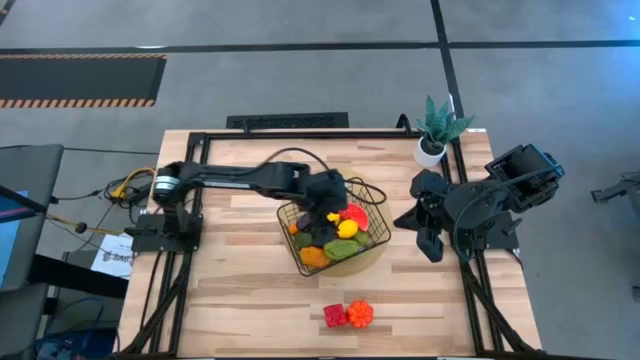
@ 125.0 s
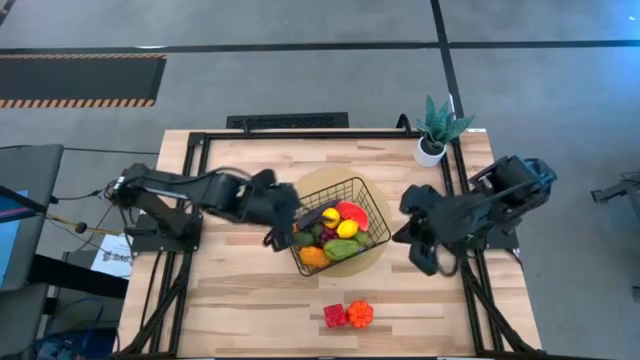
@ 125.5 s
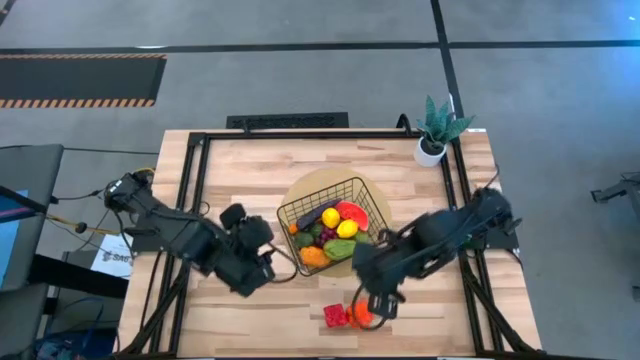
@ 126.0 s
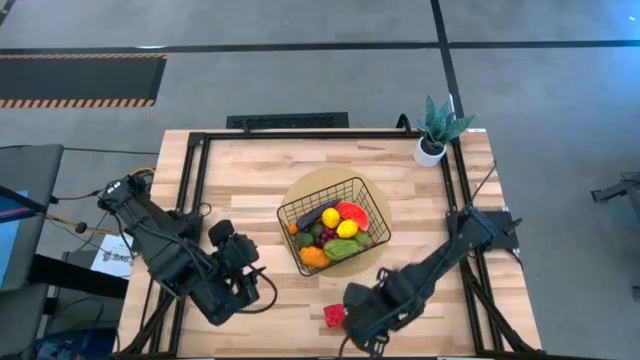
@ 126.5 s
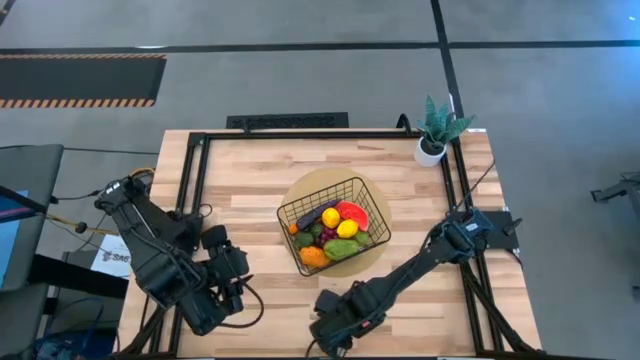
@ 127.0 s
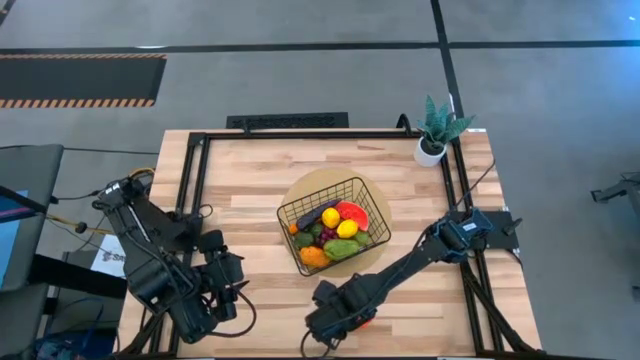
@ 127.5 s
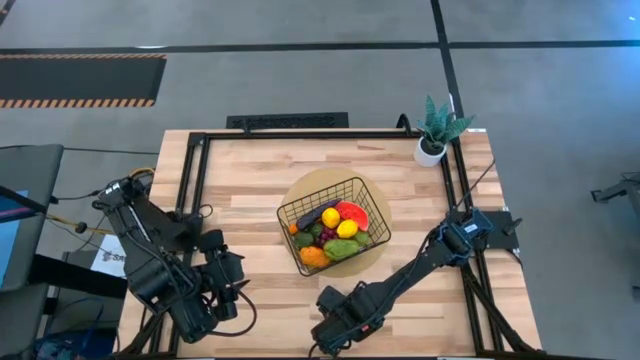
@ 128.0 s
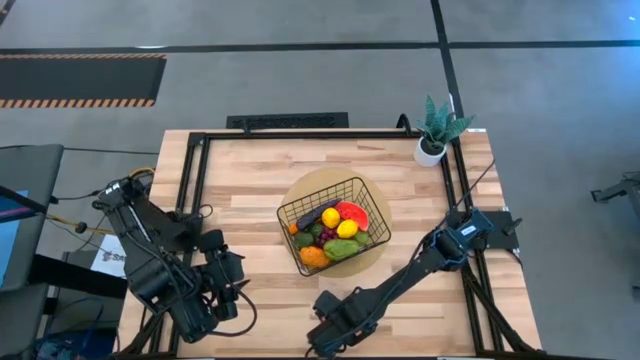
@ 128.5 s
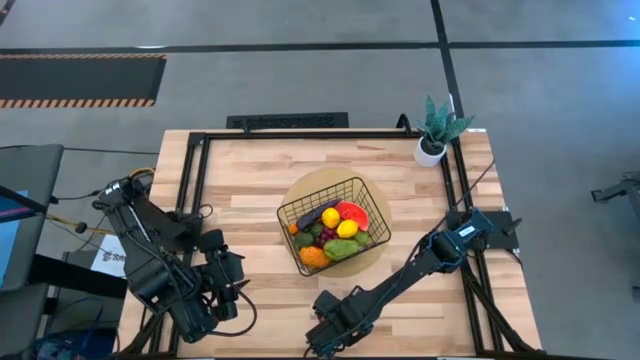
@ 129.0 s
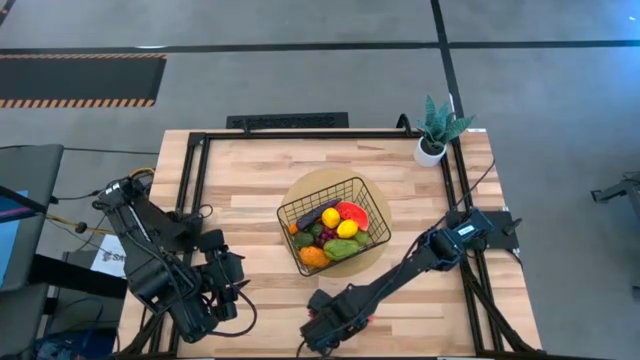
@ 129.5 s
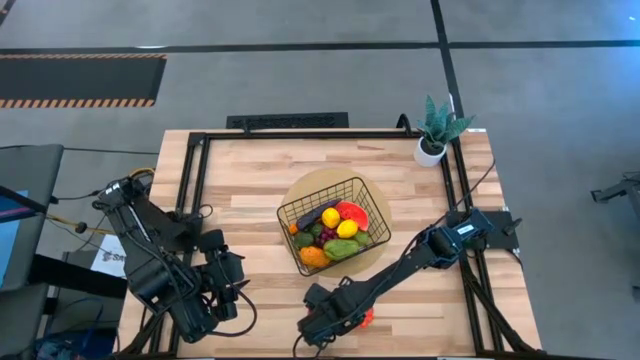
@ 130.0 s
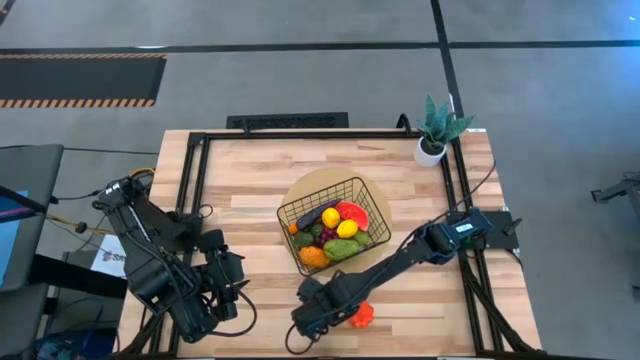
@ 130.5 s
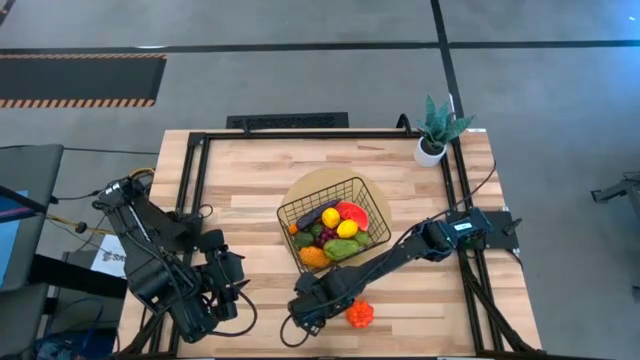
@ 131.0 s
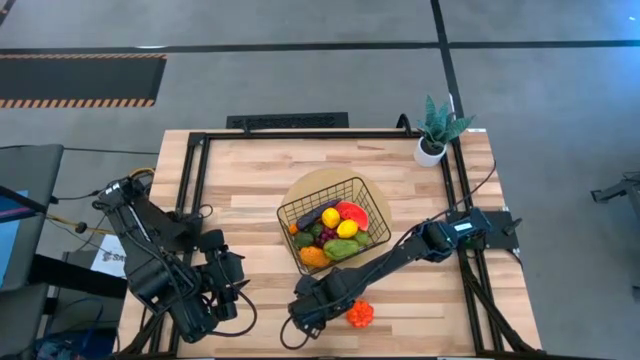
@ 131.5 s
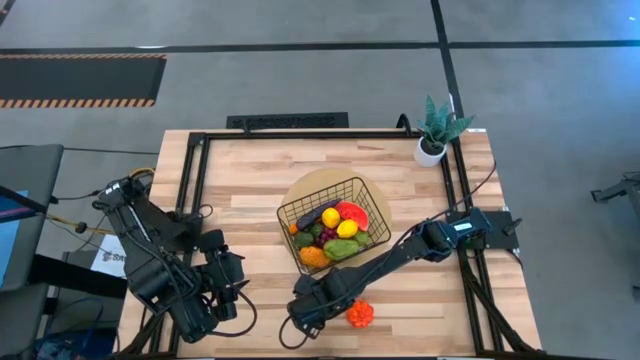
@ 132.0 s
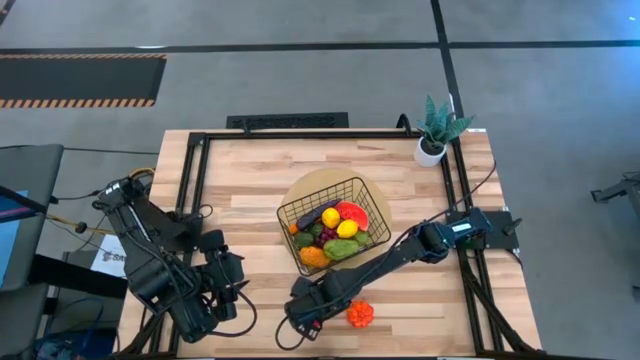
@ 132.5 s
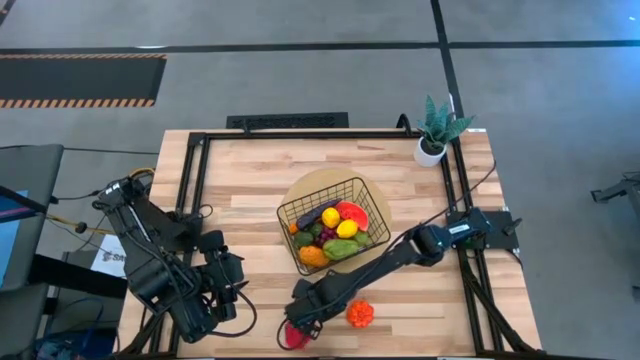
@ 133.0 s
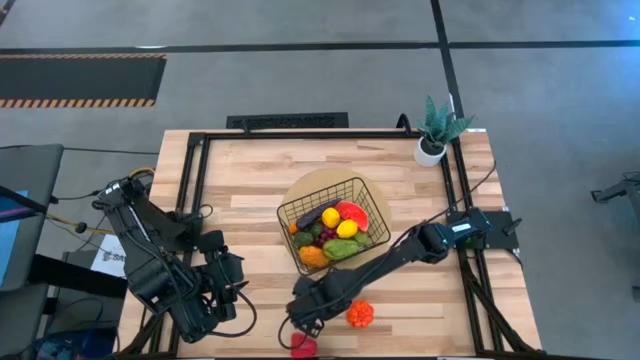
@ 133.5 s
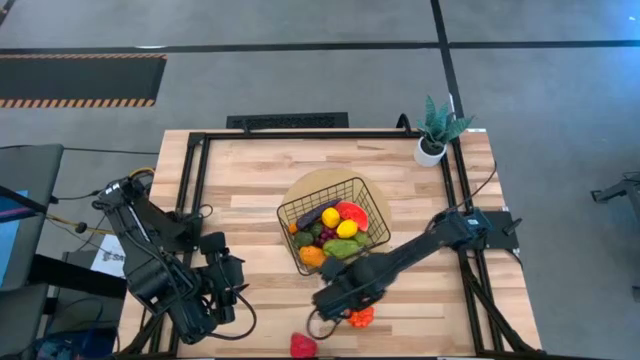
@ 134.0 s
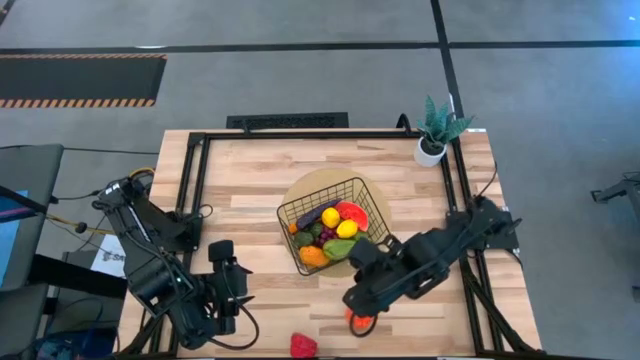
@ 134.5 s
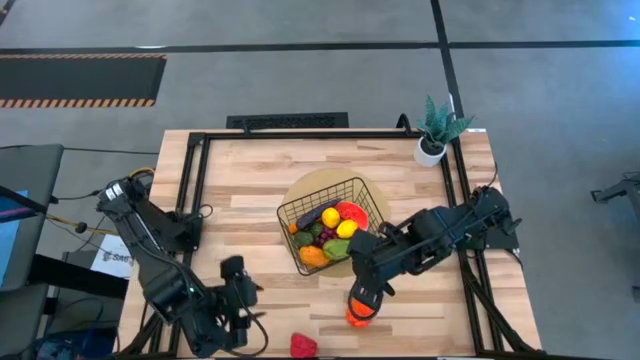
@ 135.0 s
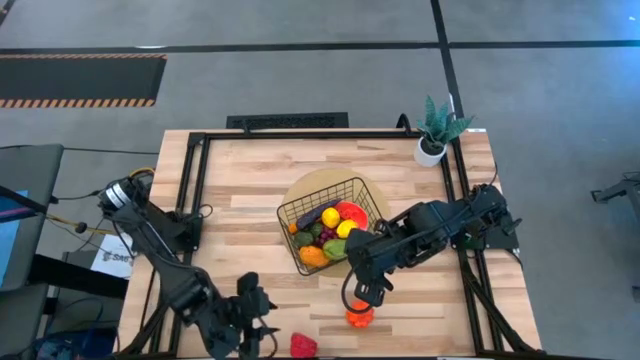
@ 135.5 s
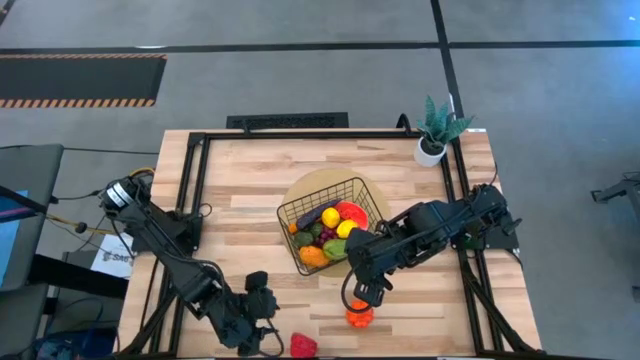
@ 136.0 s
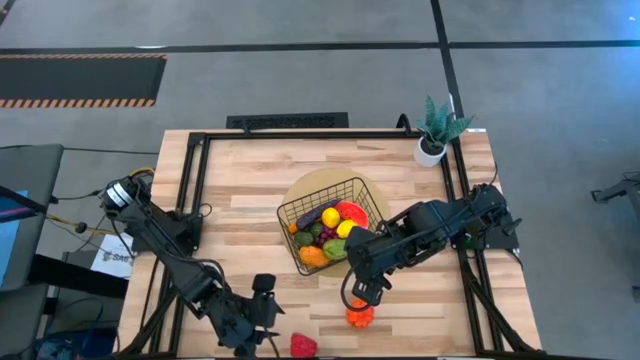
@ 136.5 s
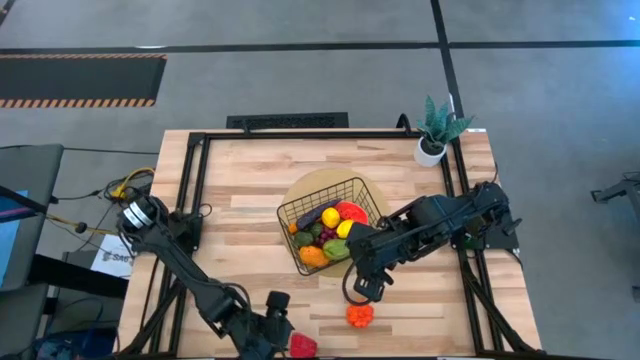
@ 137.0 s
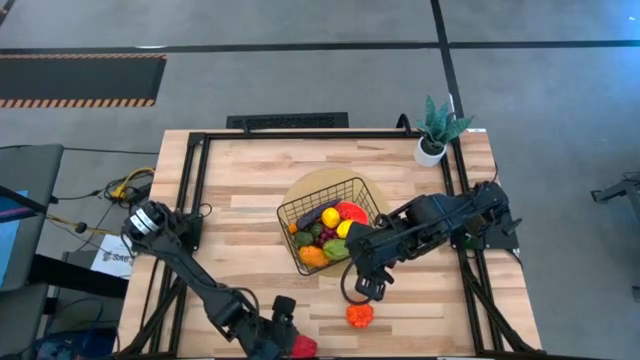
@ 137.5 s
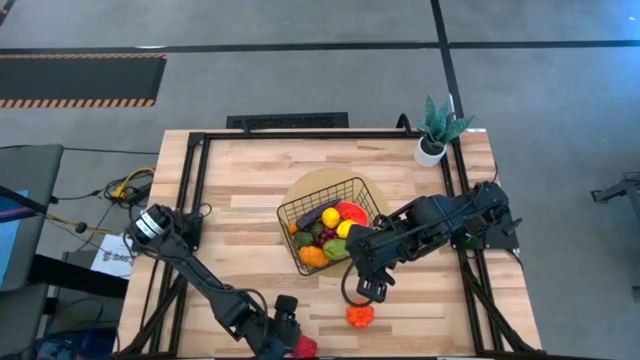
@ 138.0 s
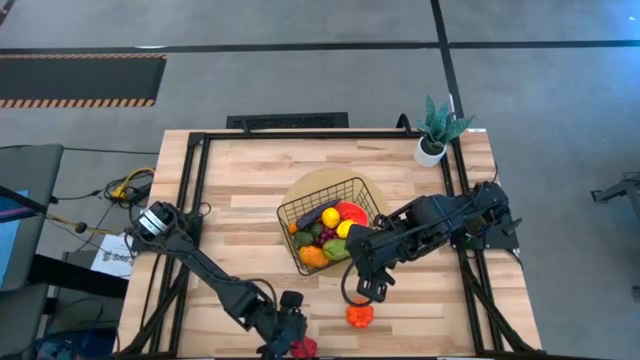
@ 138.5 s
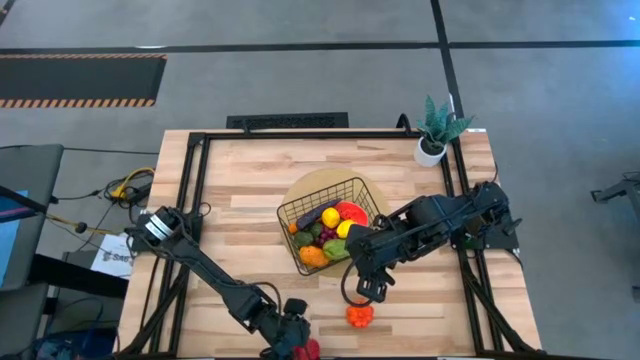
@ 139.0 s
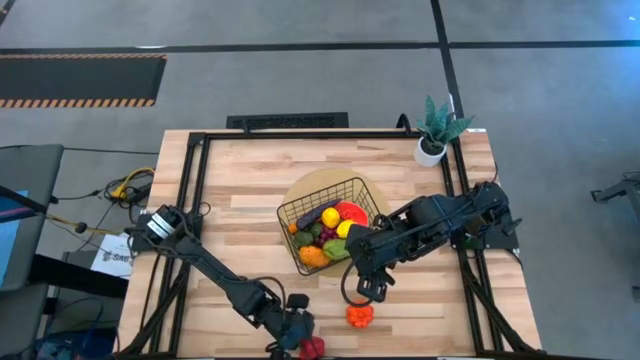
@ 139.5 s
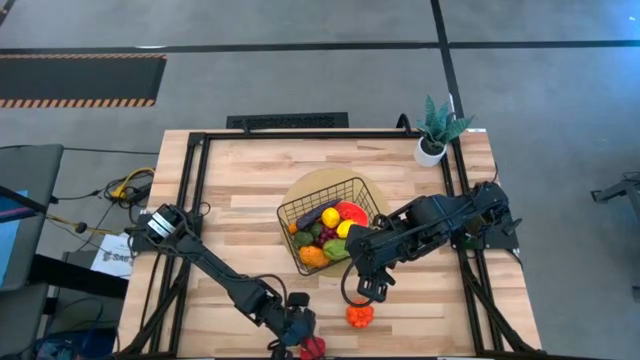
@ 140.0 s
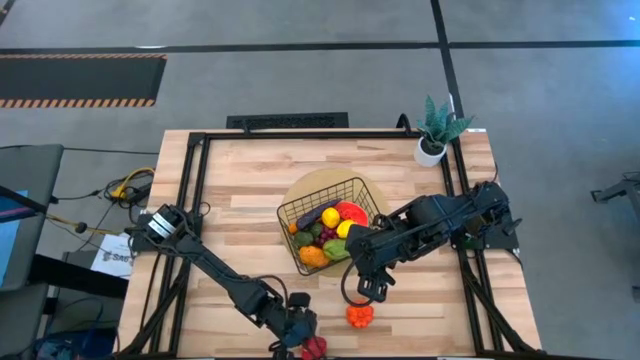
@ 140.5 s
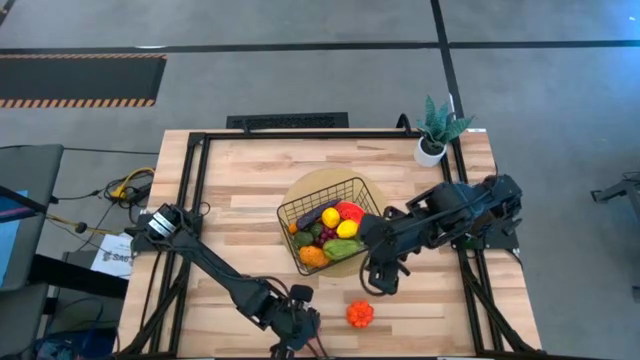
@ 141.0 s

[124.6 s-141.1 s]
Task: Build produce basket
Put the red bell pepper into the wire basket

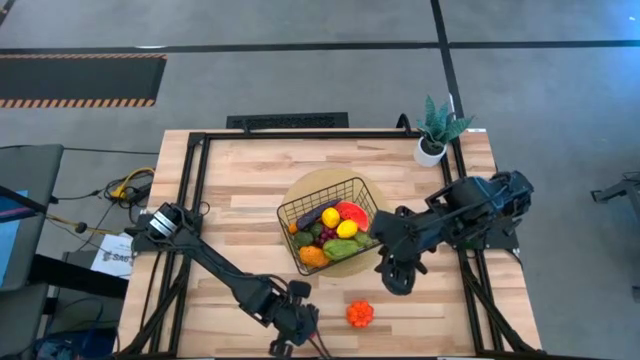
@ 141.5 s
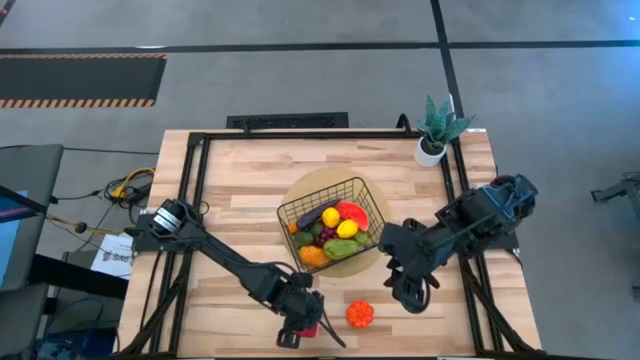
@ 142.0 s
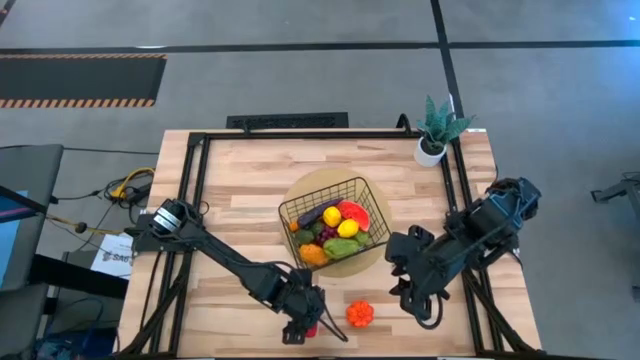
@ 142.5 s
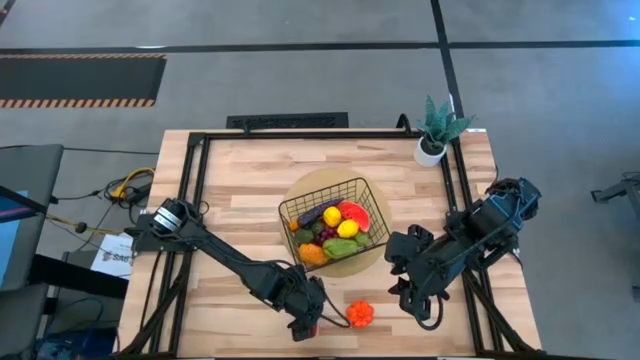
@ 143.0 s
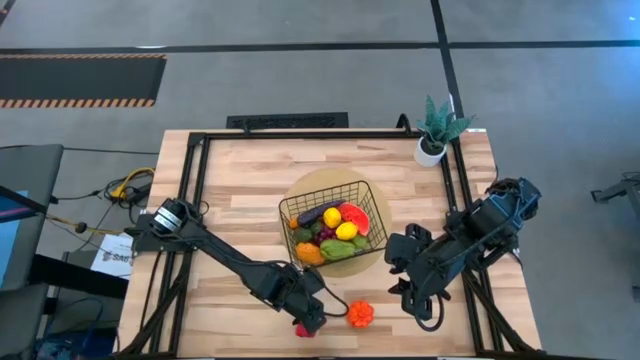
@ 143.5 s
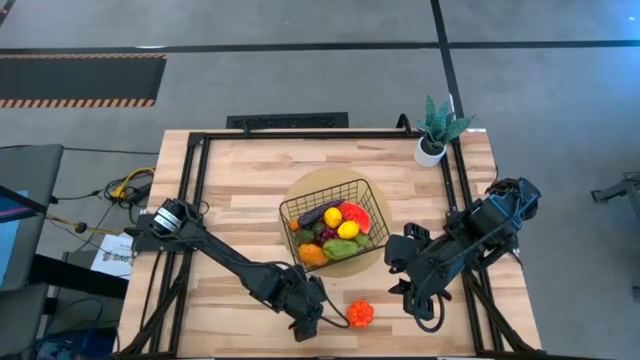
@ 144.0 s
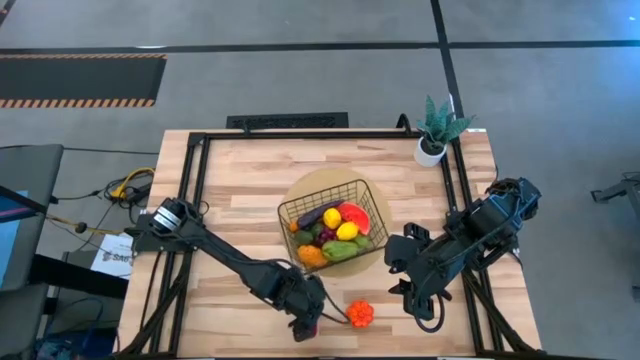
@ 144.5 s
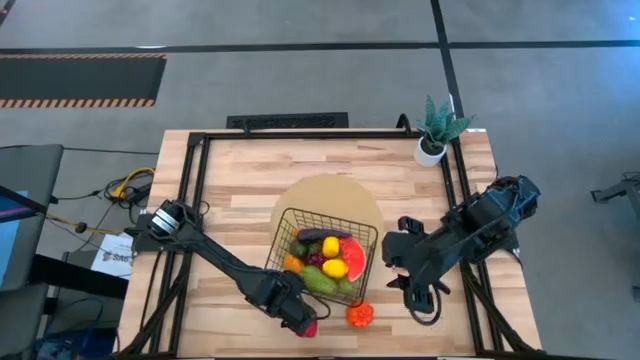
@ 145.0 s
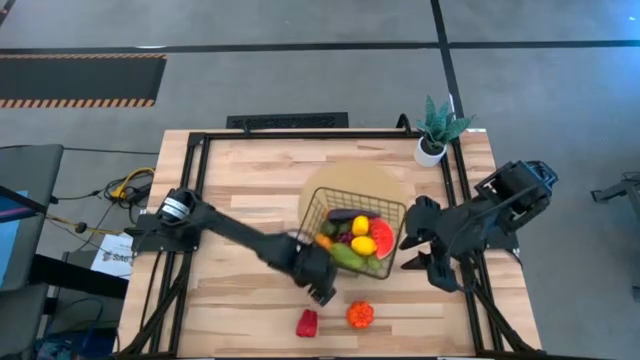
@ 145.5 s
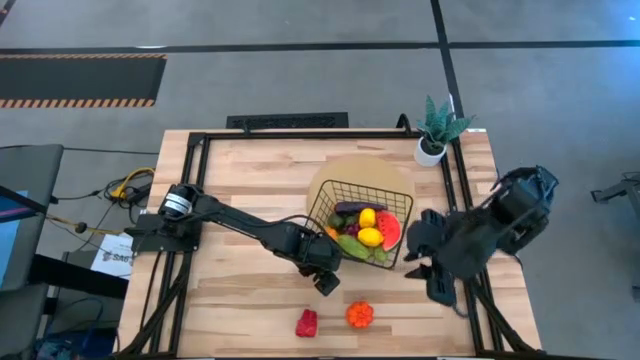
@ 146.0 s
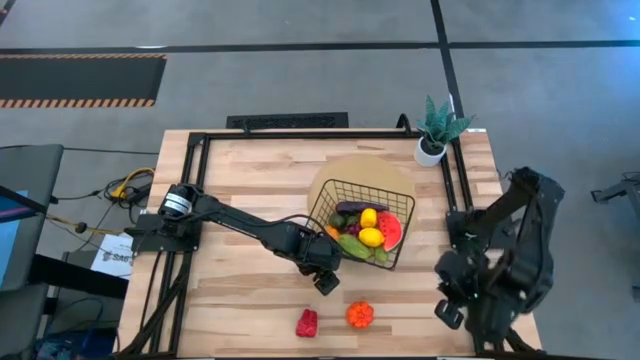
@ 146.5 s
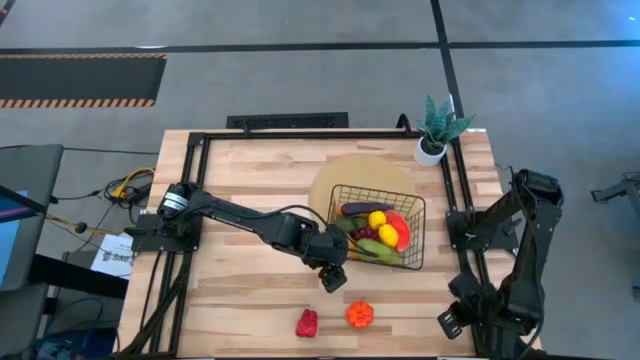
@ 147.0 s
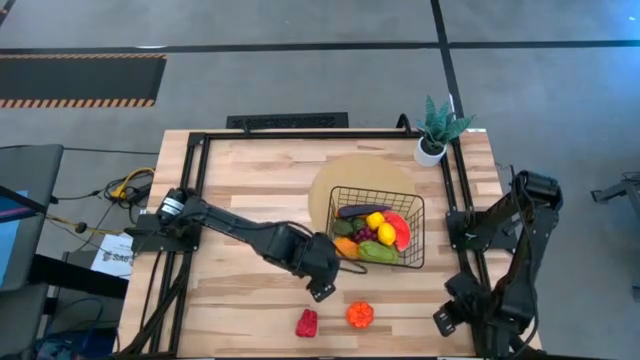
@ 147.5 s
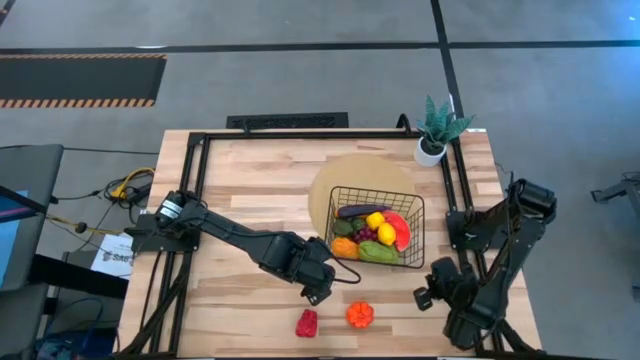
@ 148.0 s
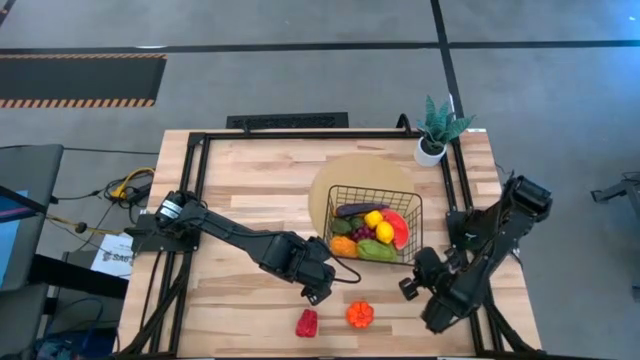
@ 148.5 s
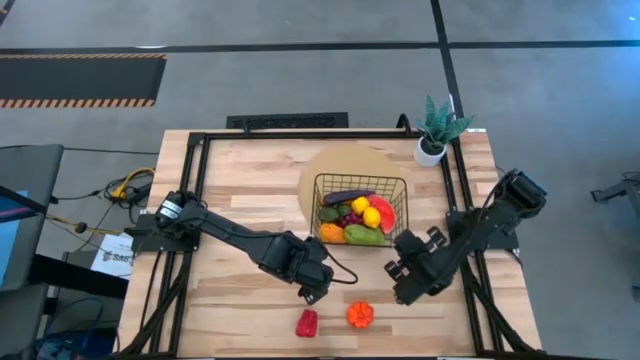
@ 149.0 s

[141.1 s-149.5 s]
Adjust the wire basket on the brown table mat
